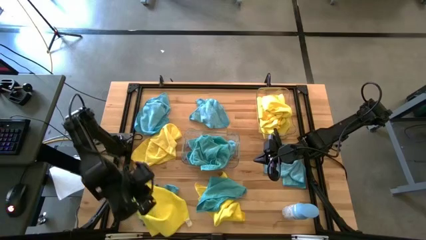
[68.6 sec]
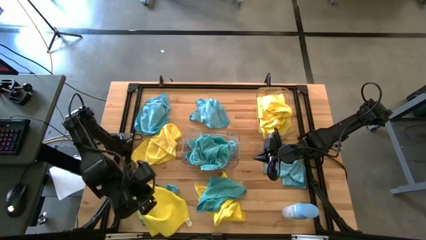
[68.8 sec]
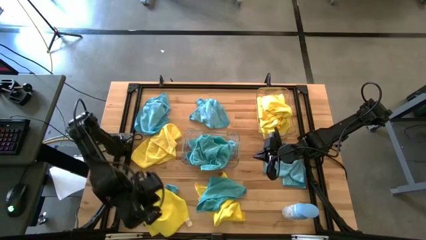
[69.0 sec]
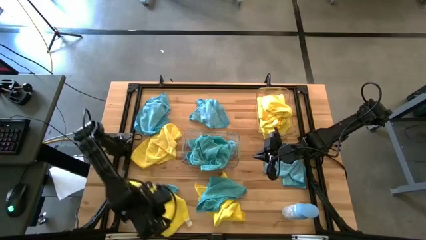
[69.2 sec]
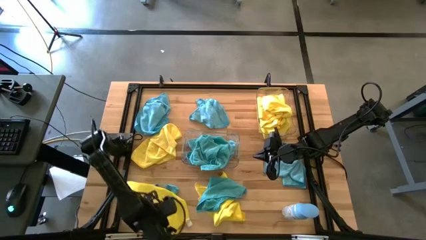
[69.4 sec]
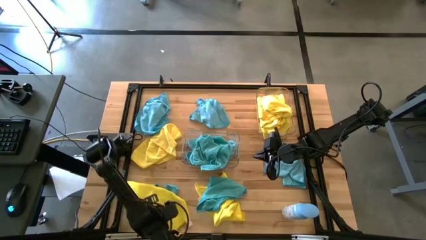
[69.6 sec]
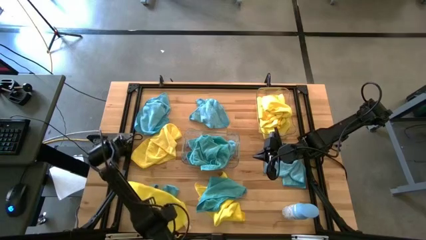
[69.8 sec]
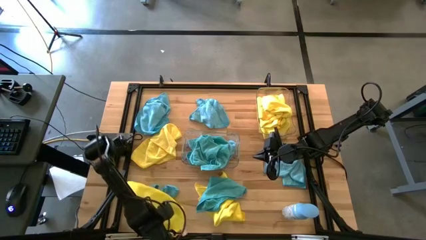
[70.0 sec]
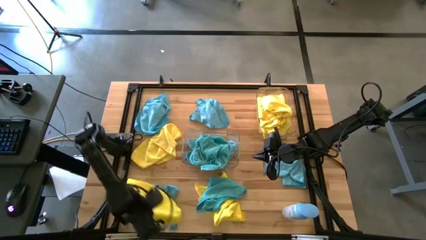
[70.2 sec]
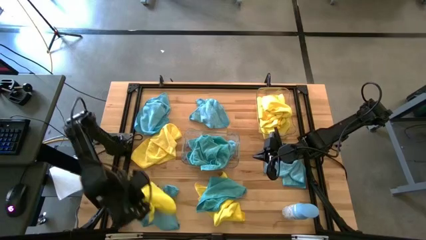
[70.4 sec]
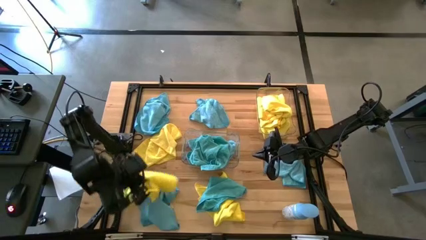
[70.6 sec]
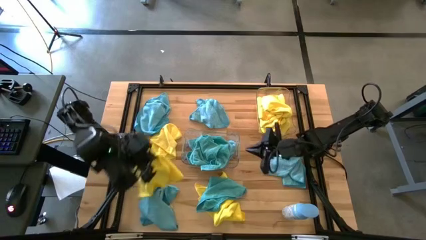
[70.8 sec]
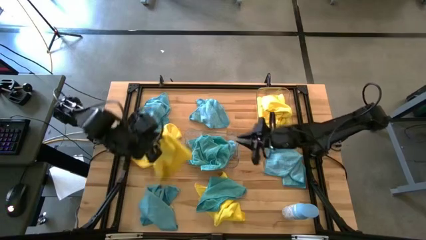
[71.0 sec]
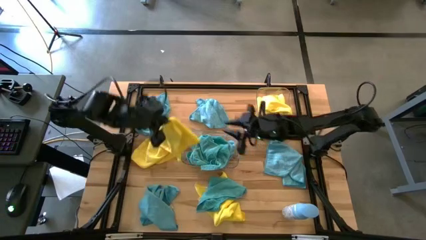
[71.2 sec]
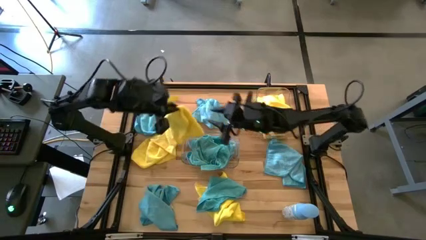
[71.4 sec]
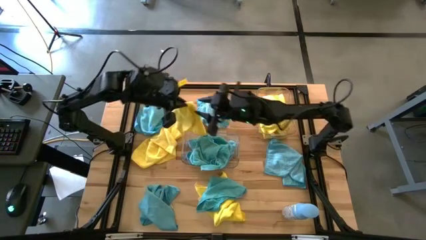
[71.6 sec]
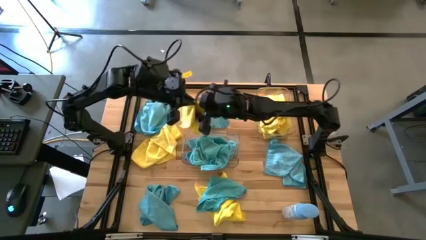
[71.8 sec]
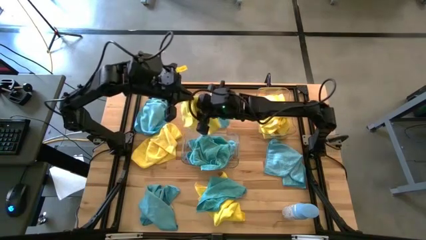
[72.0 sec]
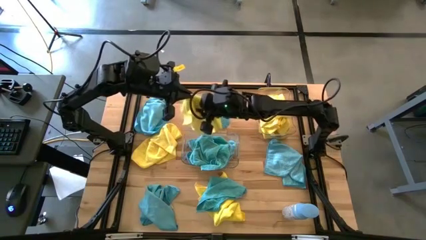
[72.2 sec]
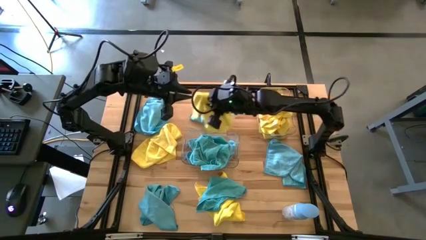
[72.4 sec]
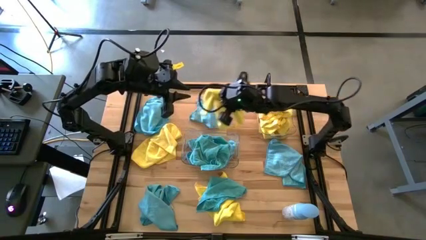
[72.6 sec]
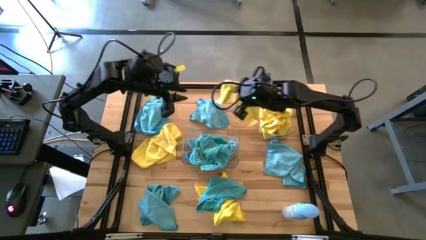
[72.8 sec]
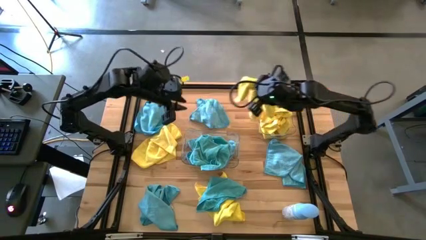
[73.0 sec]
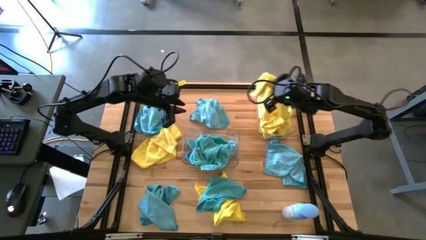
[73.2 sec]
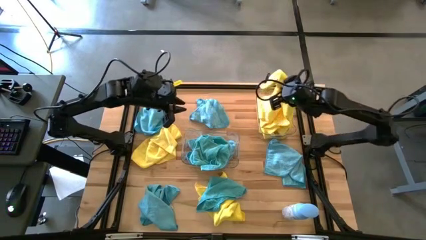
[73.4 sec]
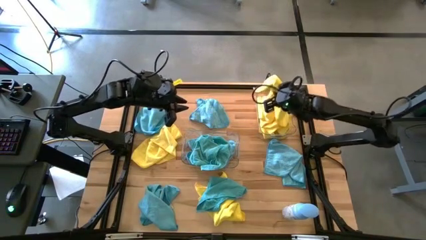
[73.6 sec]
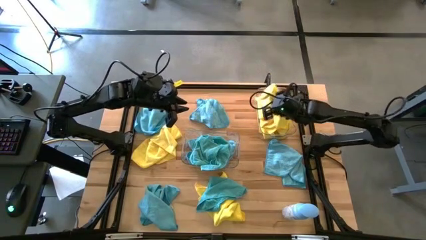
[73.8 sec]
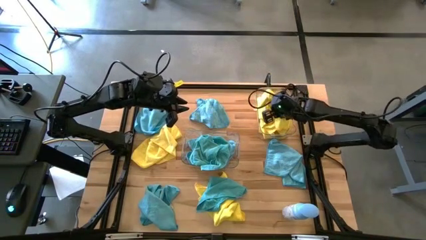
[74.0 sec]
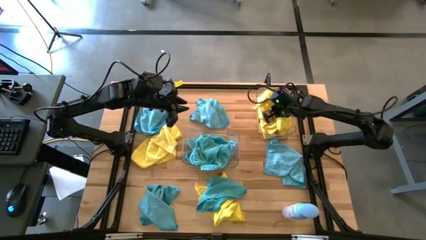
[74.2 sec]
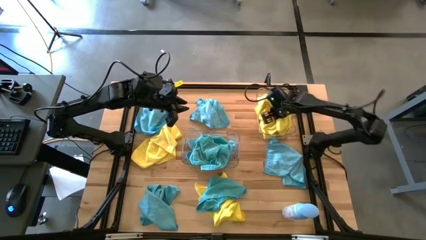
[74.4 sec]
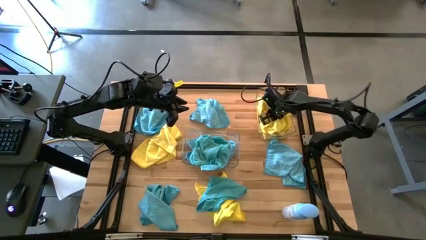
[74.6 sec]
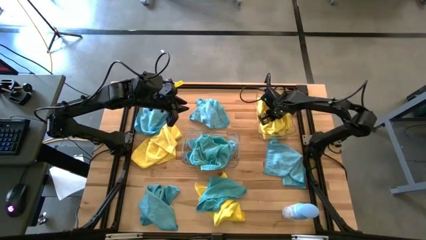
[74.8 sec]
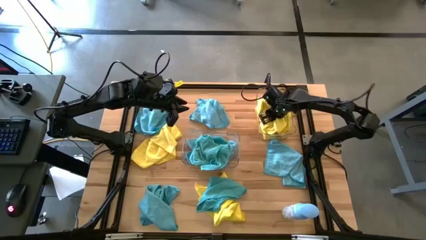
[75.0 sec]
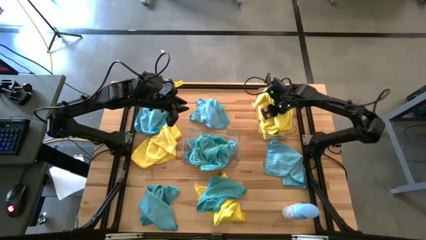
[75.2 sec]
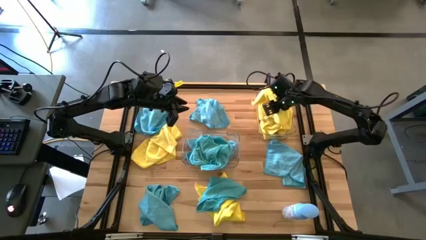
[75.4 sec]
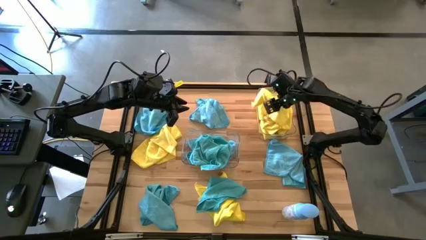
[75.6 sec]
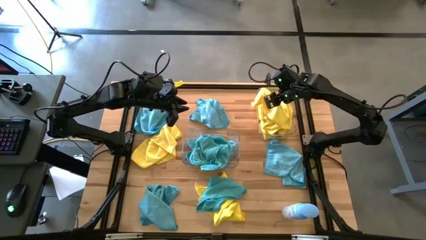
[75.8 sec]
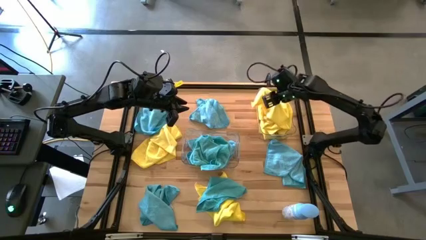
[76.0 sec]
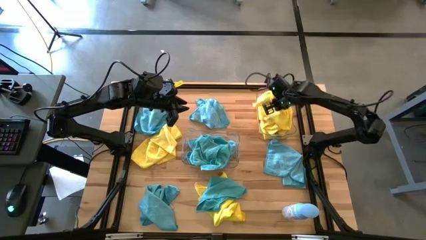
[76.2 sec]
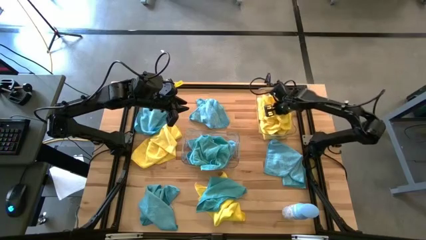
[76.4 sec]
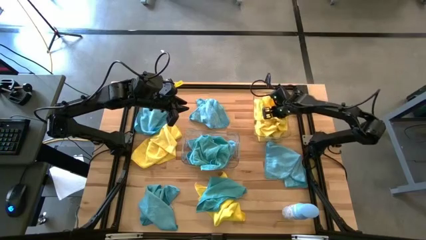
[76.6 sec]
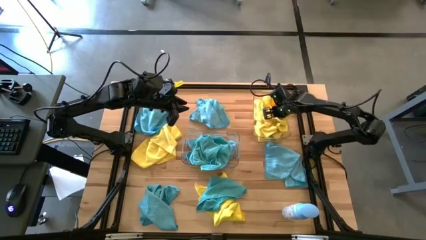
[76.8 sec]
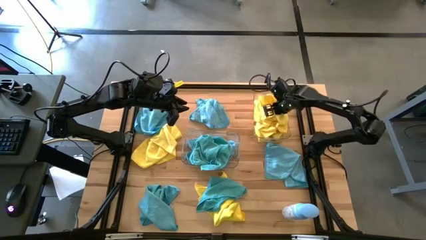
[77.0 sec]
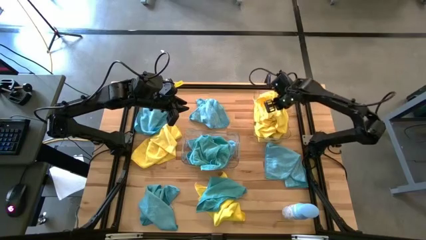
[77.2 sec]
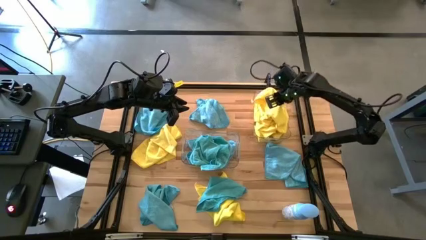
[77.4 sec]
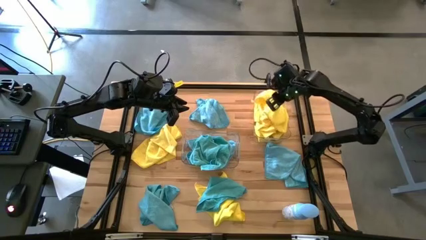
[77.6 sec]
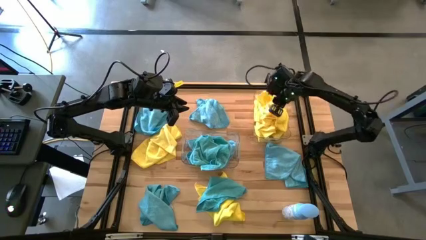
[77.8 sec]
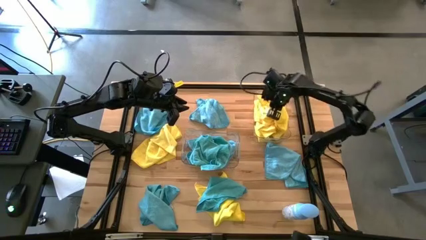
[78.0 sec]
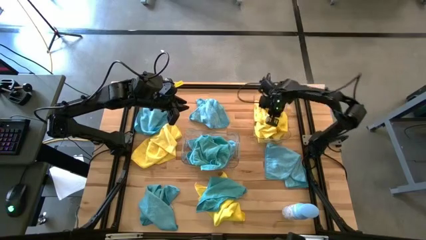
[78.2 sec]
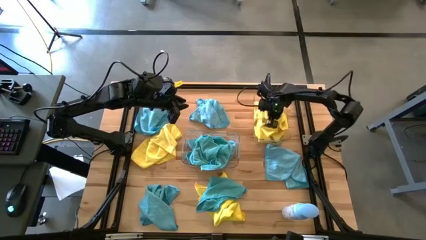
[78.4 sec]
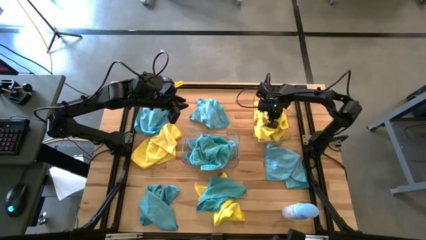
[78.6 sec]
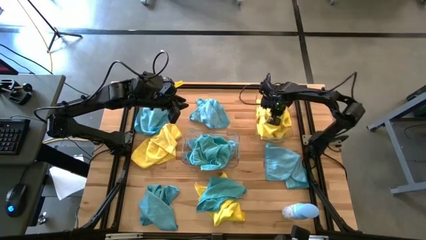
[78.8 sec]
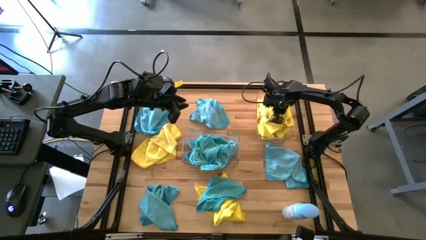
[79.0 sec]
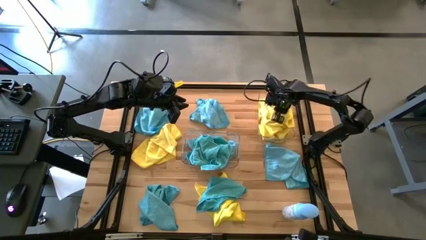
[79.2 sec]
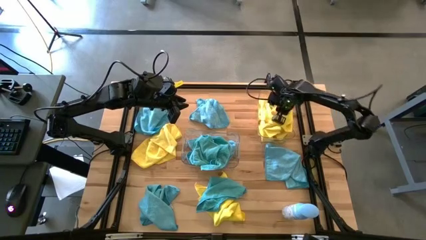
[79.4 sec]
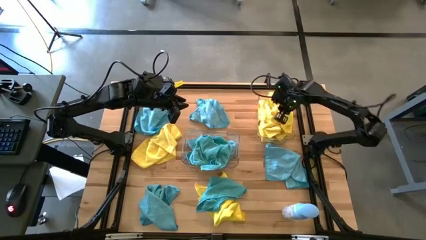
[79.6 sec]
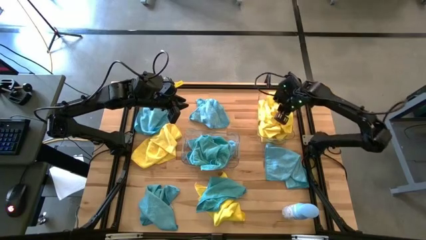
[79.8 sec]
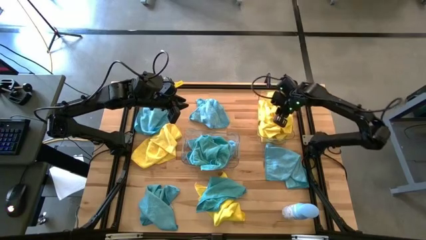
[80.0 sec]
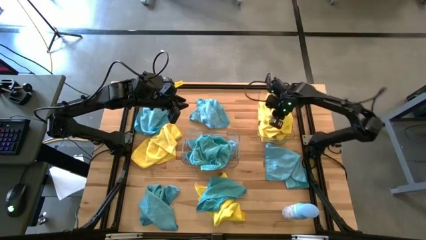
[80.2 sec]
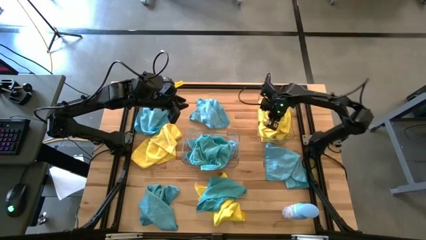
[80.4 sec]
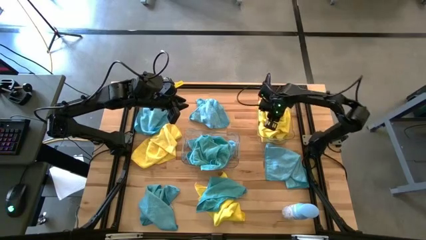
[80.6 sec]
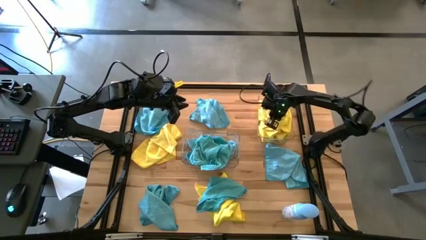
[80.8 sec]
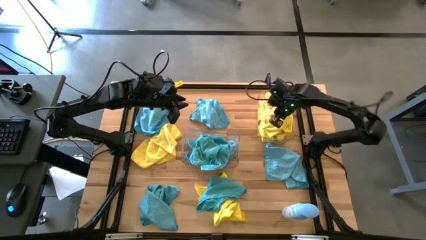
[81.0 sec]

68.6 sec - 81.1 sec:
Task: Sort microfiber towel by color & place in baskets
Put the yellow towel into the top transparent bin

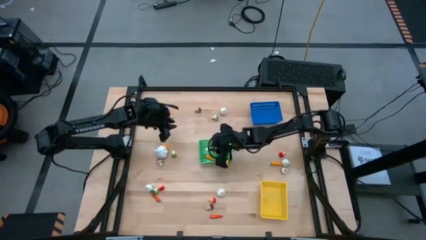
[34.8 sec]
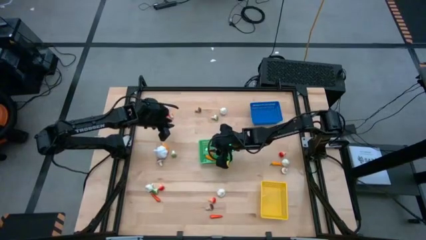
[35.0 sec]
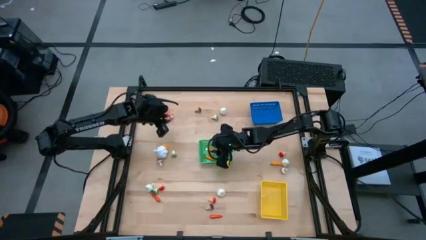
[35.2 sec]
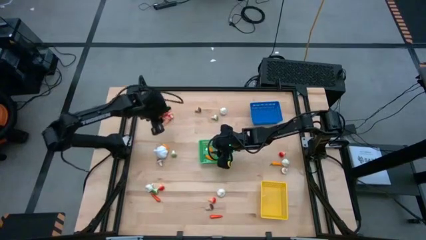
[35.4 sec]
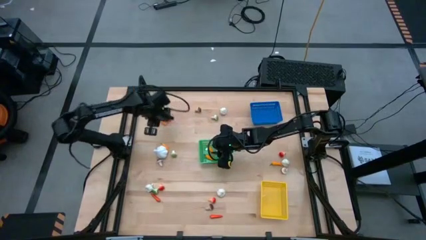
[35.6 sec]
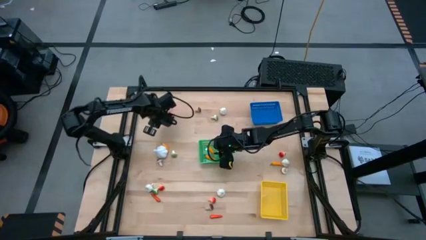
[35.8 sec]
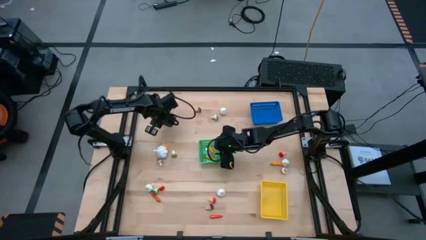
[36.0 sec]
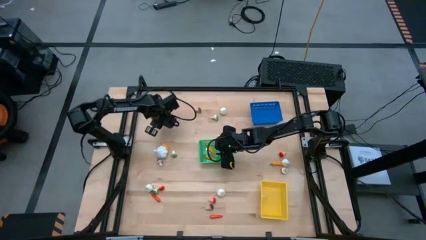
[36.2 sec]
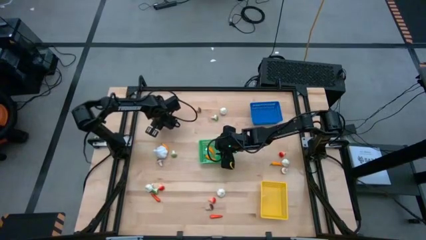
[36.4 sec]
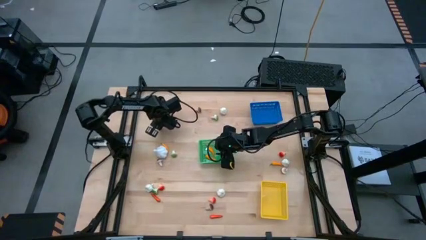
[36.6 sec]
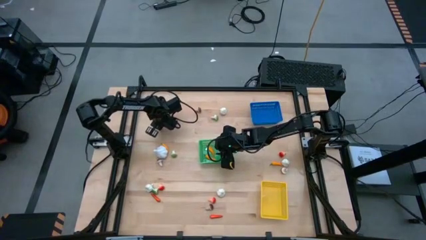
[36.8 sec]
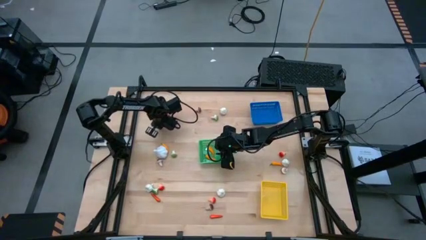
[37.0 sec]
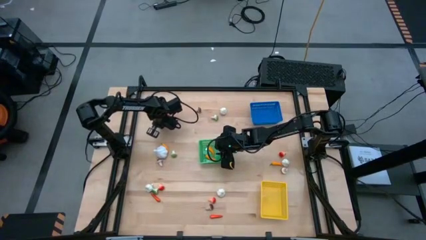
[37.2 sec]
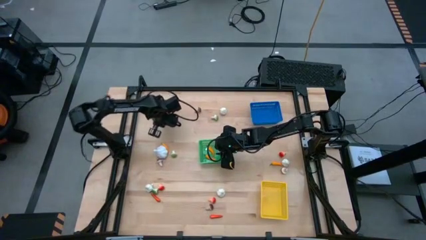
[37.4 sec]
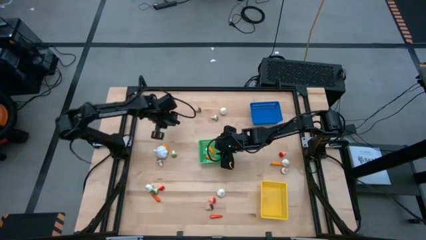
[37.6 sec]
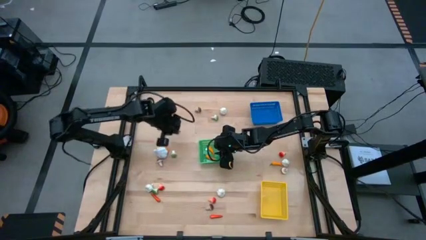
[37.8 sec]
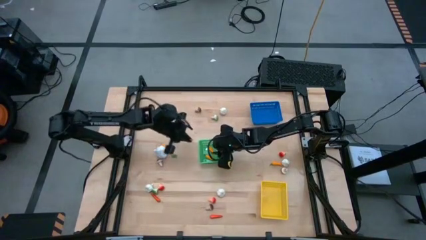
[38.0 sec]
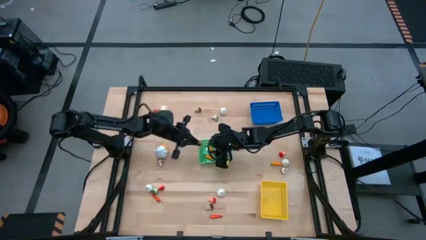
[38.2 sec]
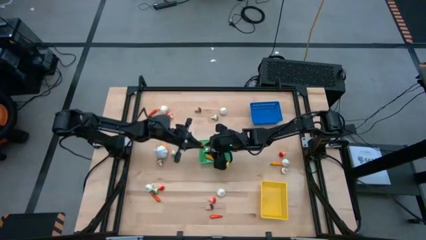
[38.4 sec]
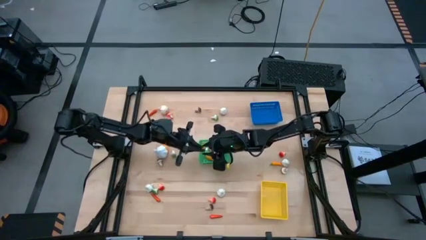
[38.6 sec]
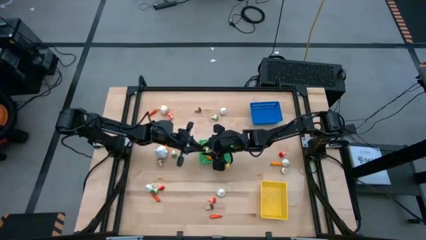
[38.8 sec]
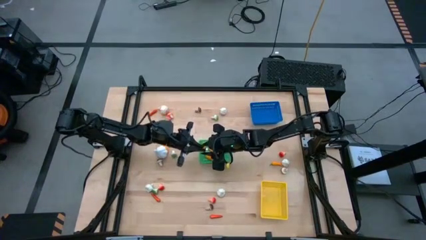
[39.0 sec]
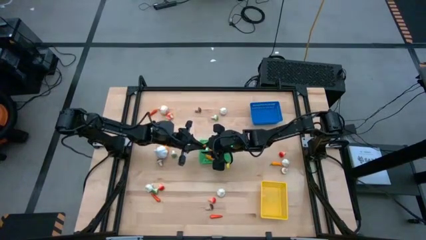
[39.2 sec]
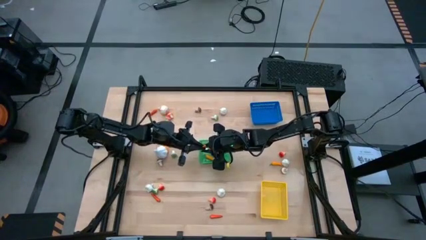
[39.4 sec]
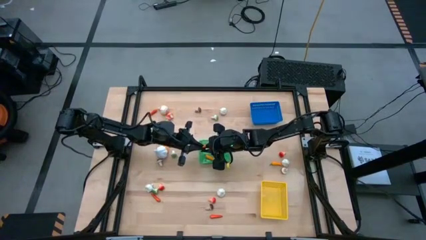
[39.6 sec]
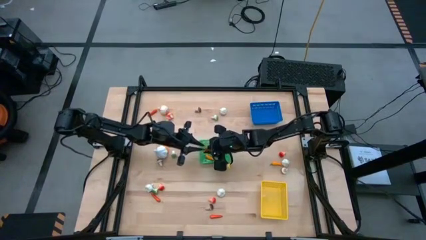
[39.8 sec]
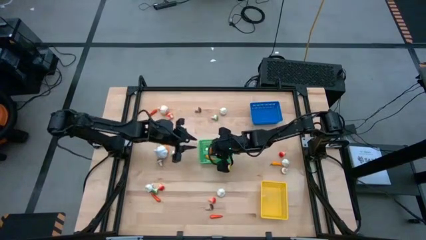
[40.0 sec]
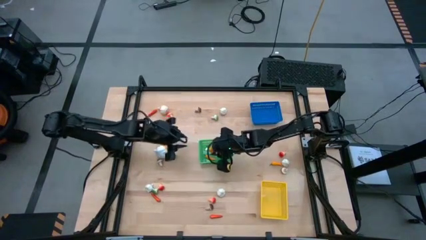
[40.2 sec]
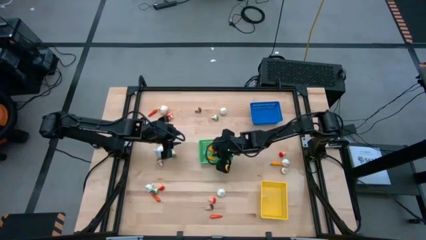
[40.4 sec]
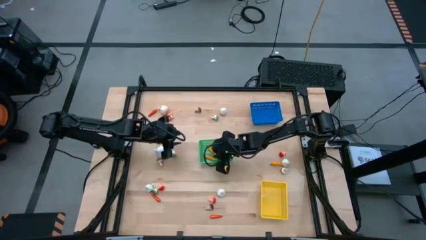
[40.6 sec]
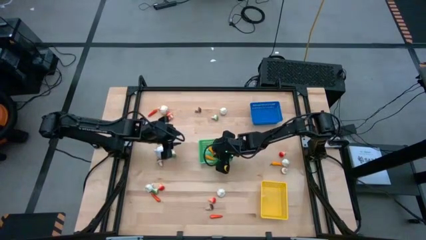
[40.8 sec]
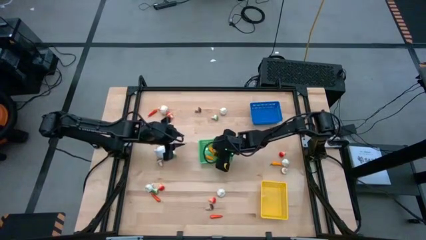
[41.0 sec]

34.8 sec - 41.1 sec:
Task: Sort produce into baskets
Put the yellow chili pepper into the green bin
